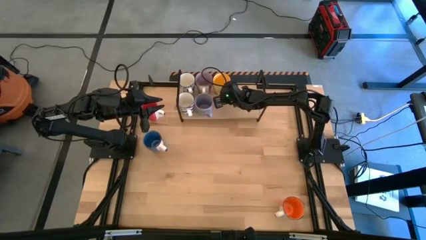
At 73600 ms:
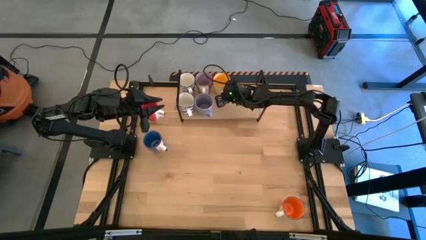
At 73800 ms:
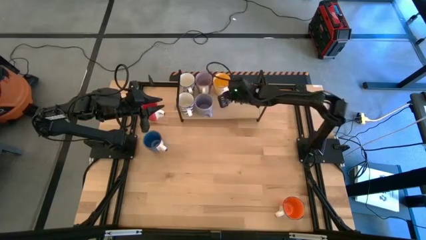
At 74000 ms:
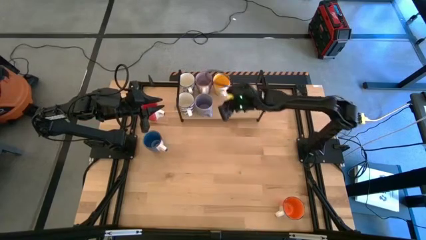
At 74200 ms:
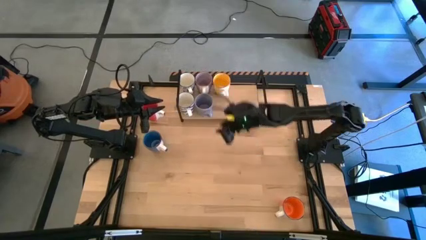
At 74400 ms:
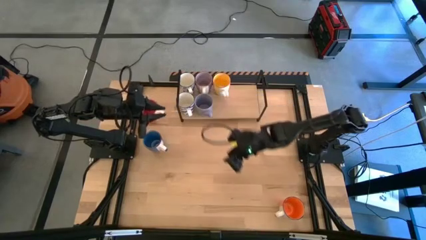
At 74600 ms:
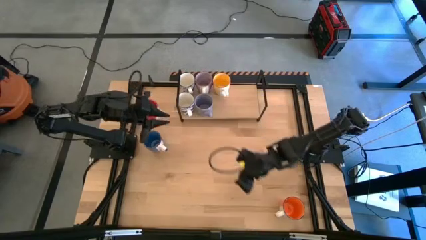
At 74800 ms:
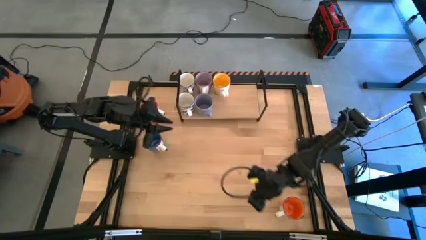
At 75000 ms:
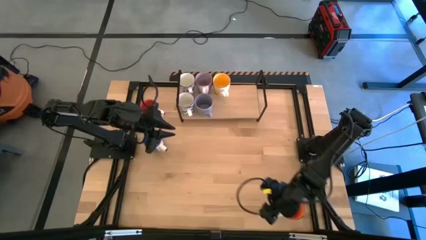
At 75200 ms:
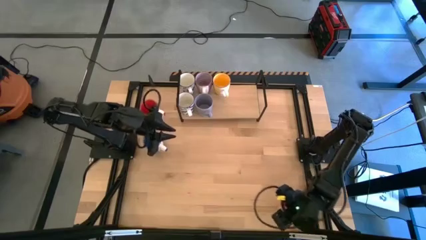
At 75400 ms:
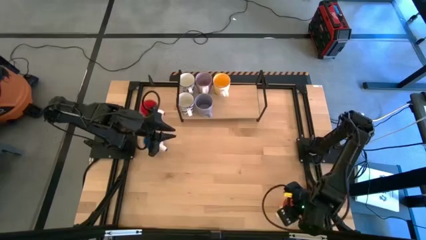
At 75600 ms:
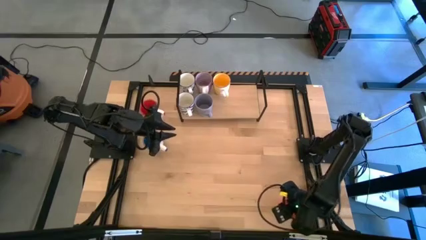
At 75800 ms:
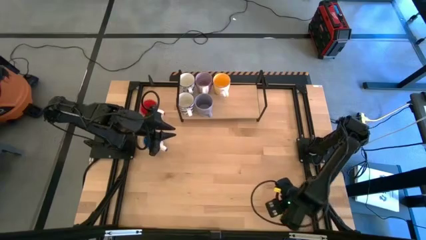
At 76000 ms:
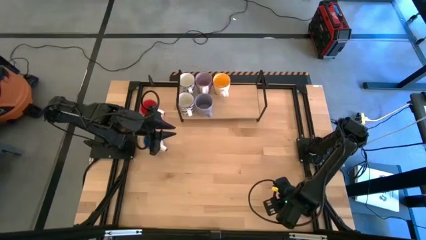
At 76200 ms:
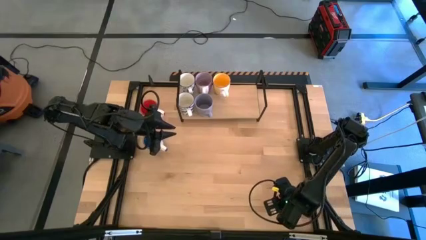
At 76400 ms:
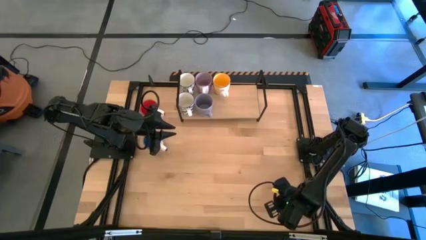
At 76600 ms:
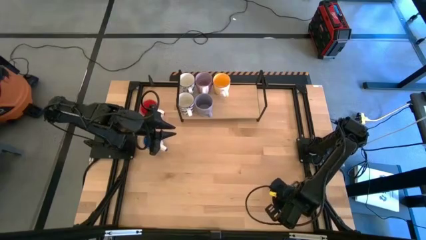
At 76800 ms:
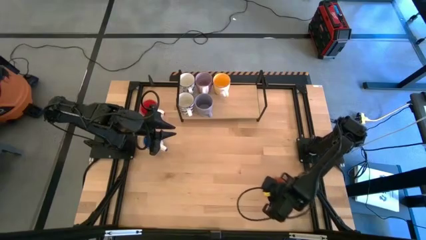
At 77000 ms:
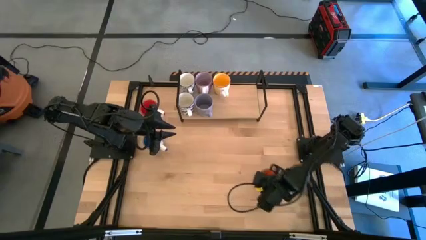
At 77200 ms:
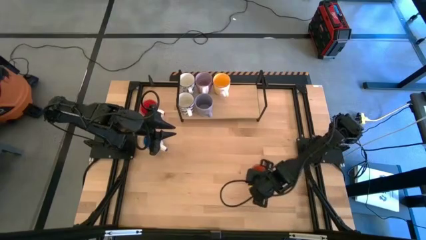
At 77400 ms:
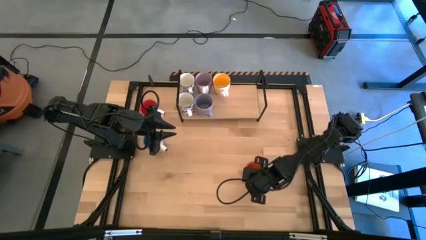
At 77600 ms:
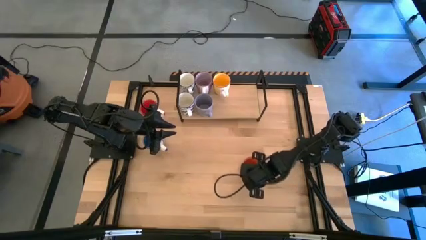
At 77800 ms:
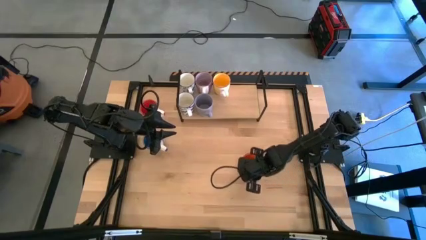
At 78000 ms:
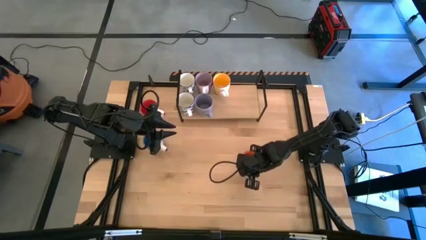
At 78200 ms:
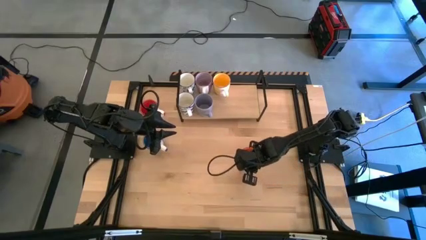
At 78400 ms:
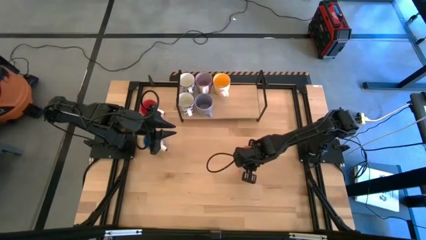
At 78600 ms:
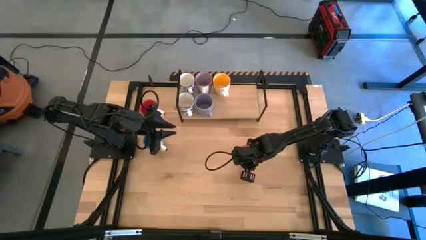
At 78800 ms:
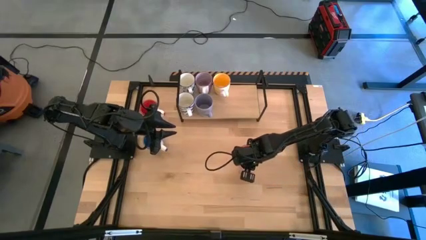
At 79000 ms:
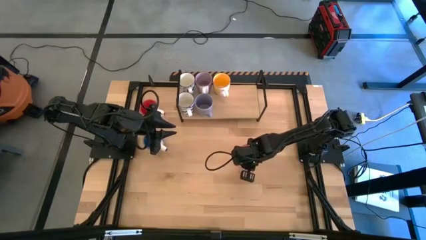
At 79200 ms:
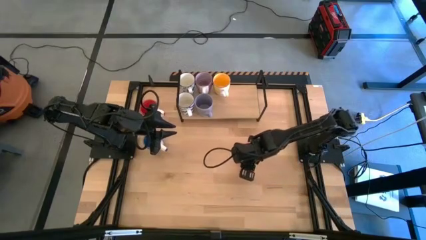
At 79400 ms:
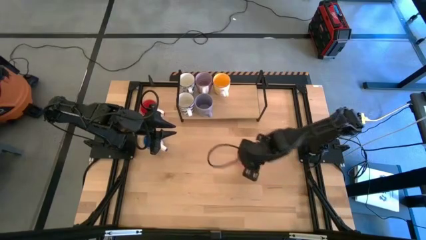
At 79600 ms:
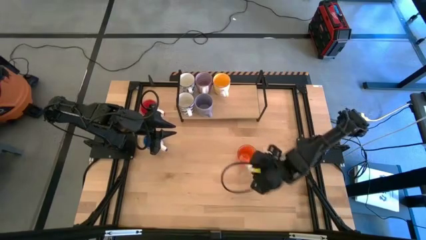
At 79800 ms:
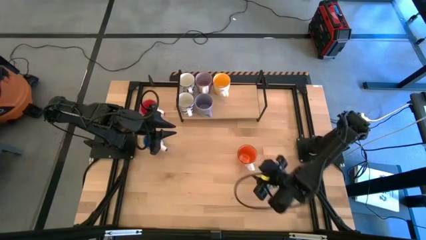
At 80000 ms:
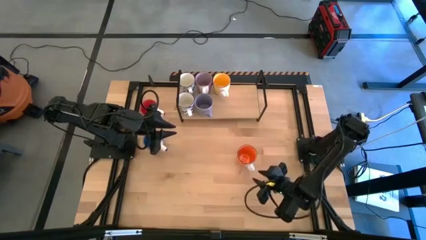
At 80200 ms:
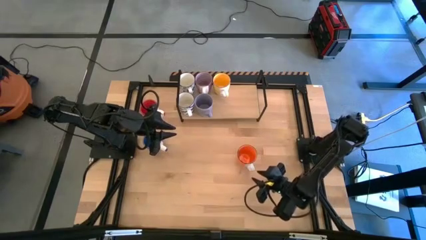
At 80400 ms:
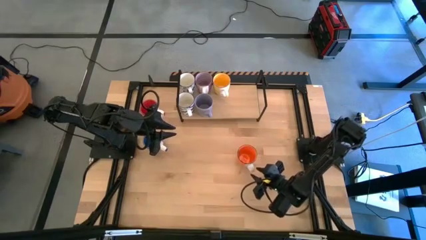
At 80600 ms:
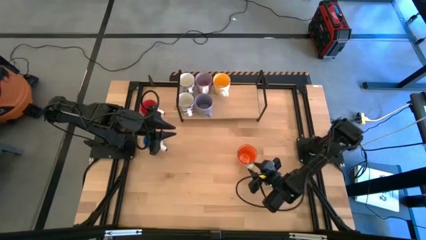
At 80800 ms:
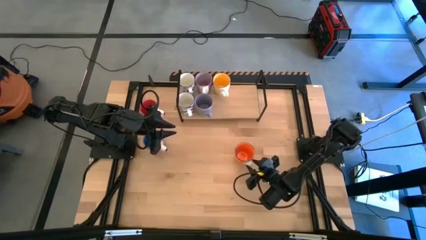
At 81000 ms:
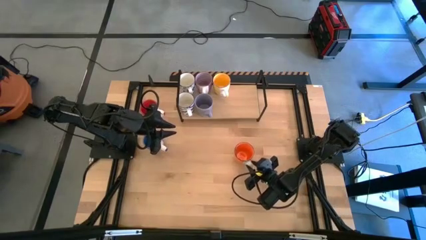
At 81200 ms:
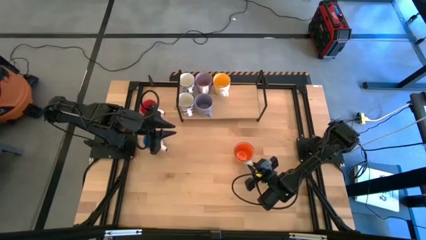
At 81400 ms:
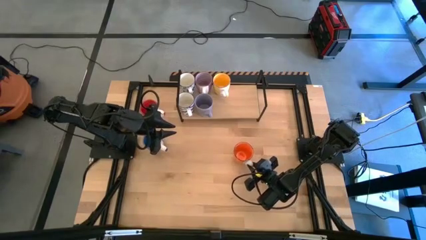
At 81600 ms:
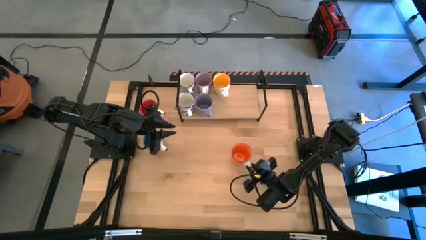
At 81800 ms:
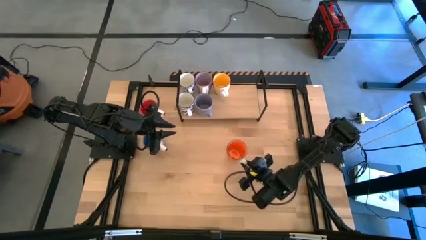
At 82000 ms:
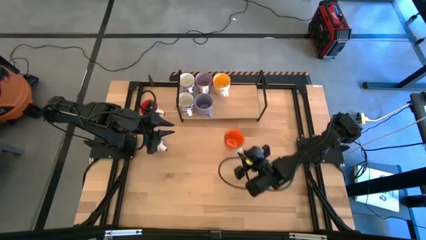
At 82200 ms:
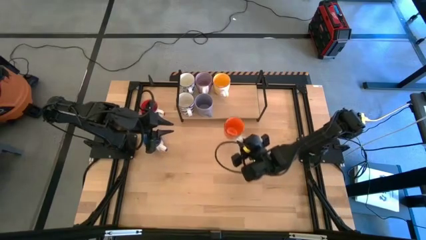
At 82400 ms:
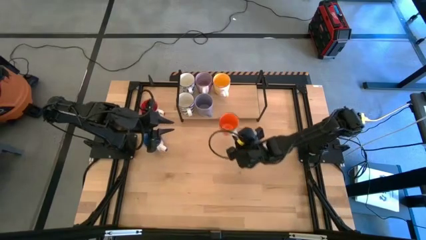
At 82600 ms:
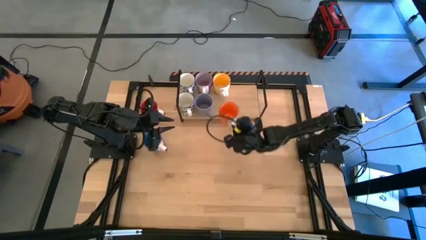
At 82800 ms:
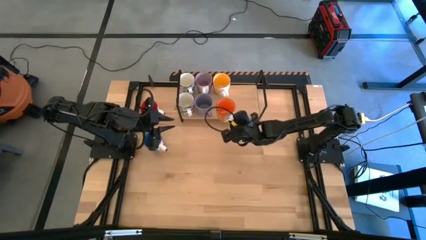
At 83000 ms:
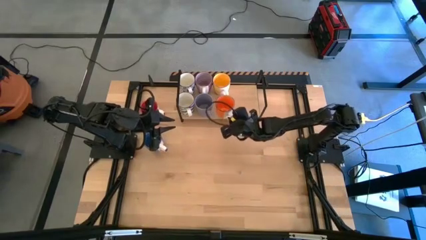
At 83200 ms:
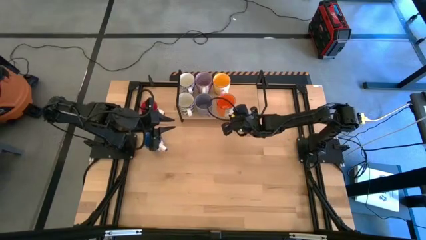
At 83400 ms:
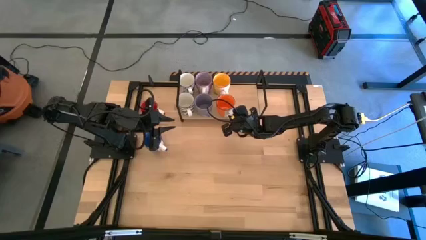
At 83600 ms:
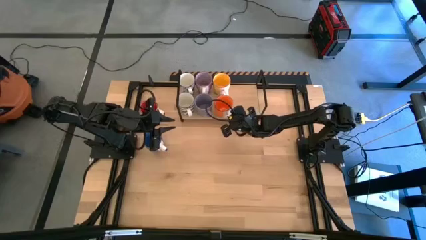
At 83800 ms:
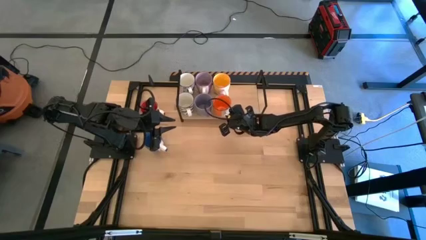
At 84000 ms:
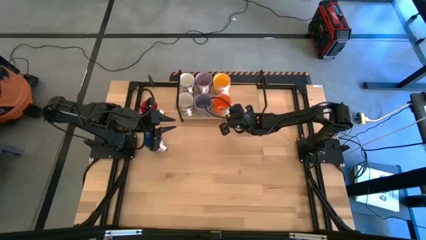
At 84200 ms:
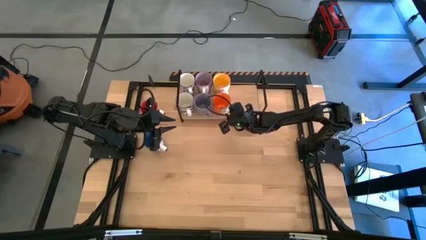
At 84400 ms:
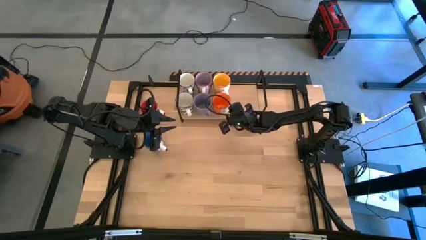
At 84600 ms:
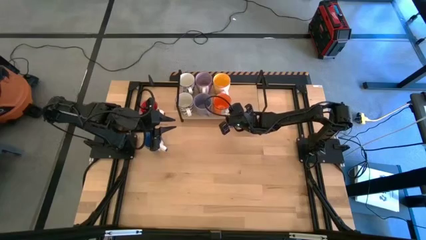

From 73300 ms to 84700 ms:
Task: Place coffee mugs
Put the orange mug on the shelf
